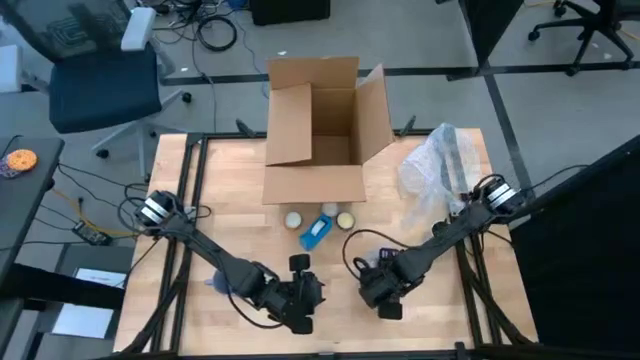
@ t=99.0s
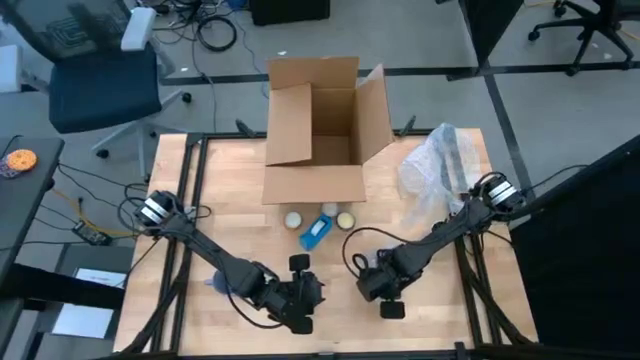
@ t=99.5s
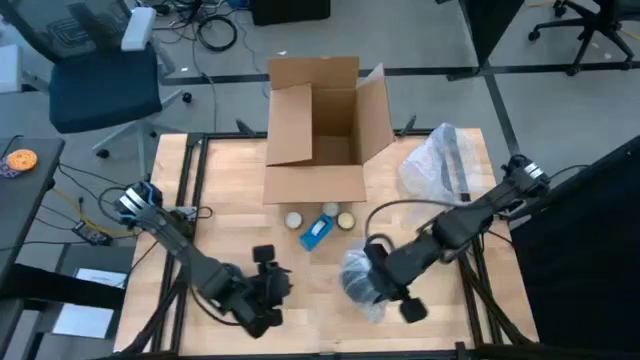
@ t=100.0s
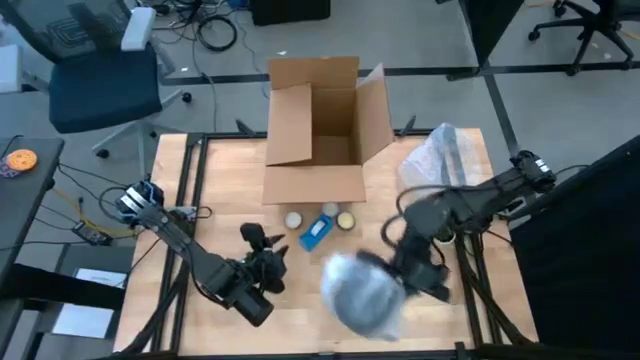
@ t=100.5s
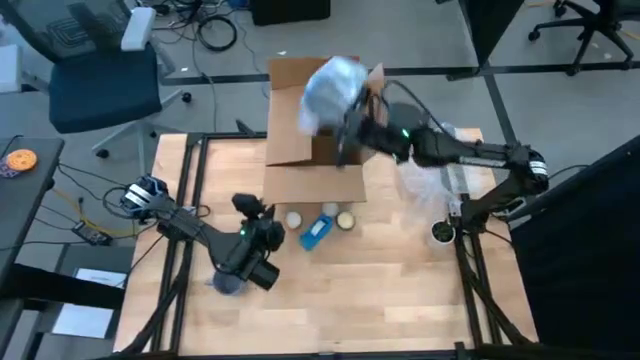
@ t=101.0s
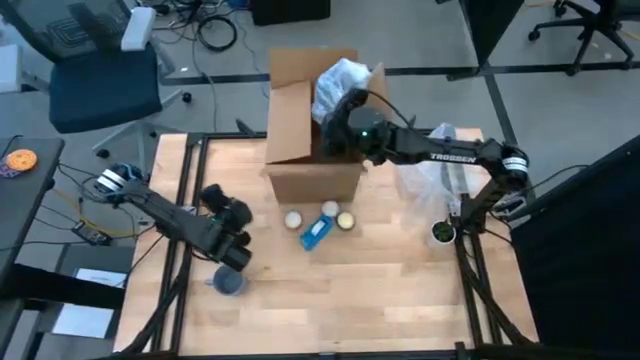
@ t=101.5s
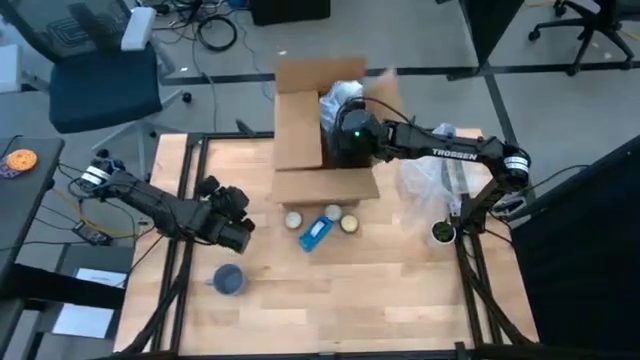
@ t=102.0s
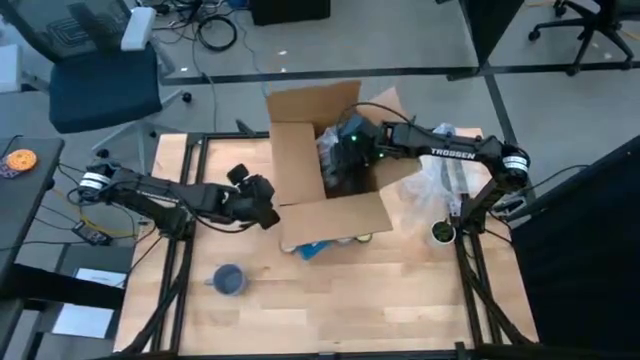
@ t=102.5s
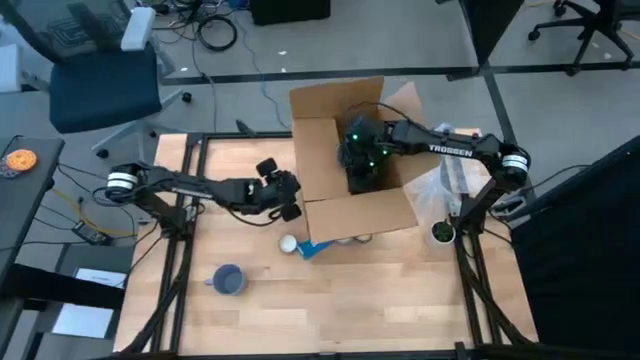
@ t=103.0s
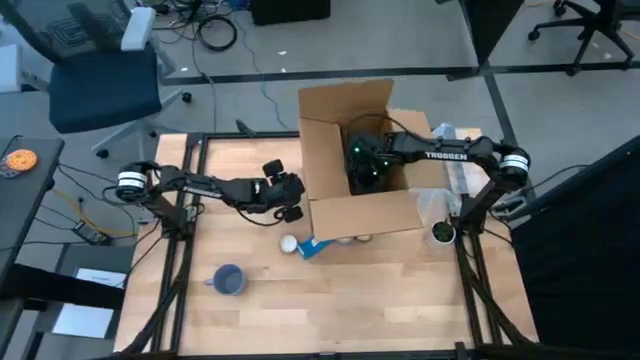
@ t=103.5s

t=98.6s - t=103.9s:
Task: wrap mug
Put the wrapped black mug into the box

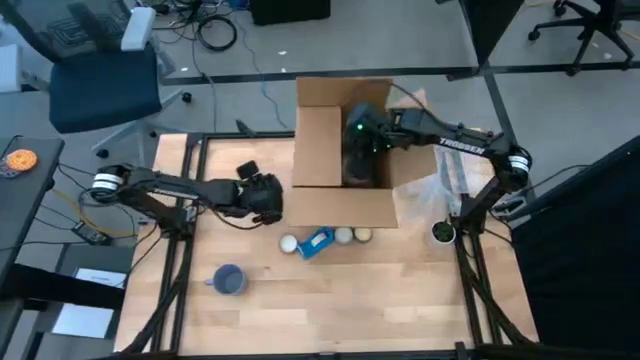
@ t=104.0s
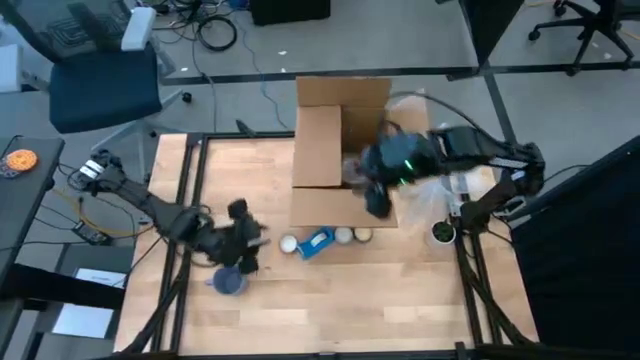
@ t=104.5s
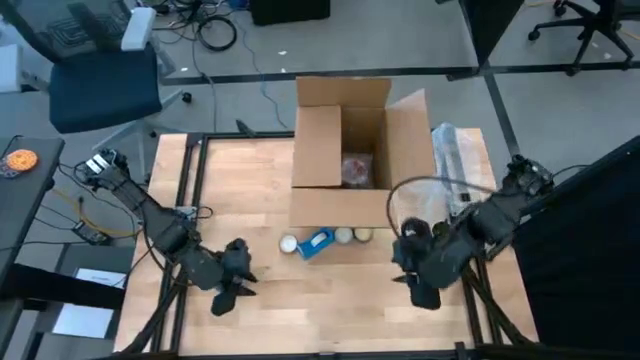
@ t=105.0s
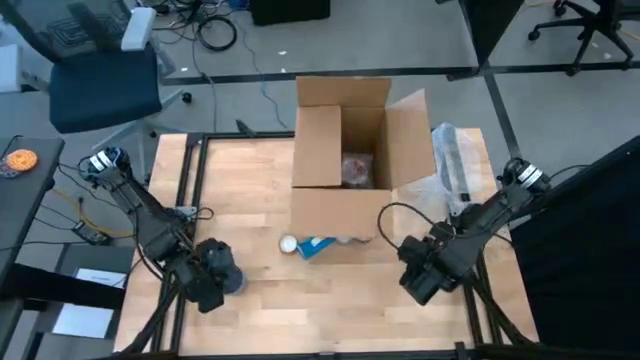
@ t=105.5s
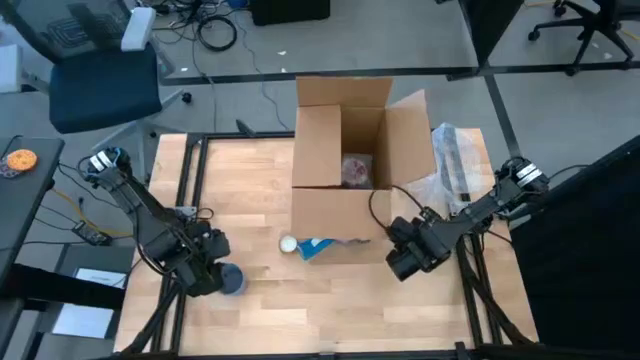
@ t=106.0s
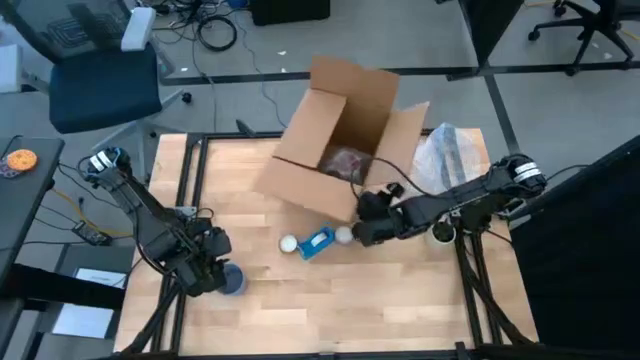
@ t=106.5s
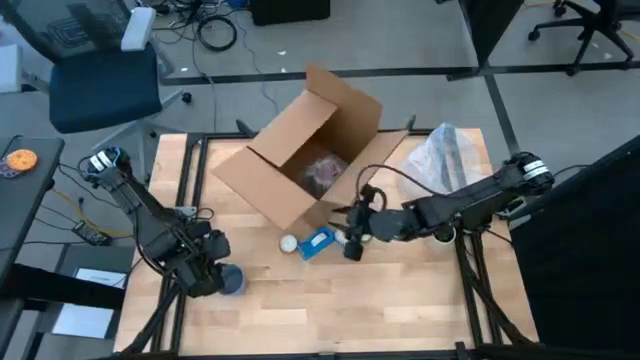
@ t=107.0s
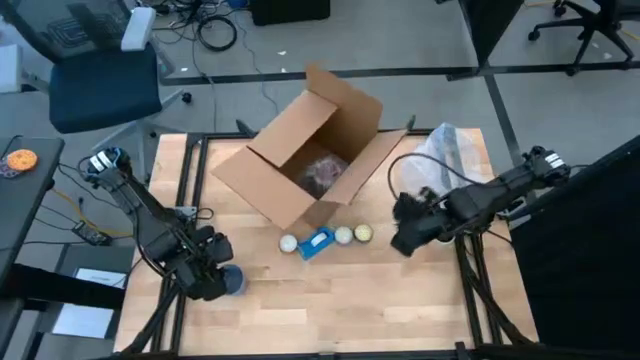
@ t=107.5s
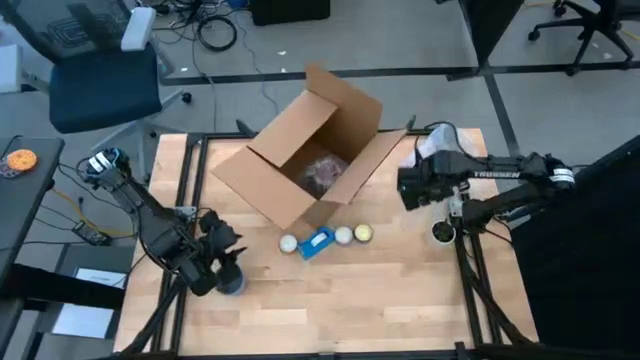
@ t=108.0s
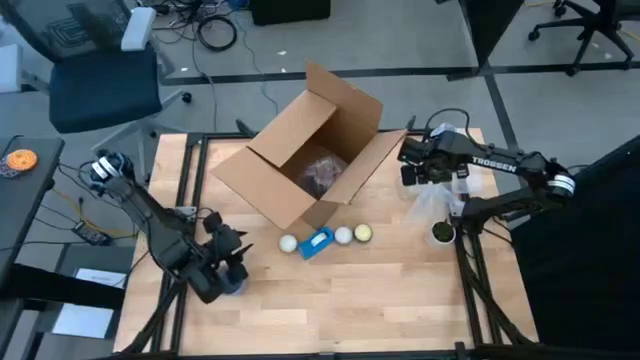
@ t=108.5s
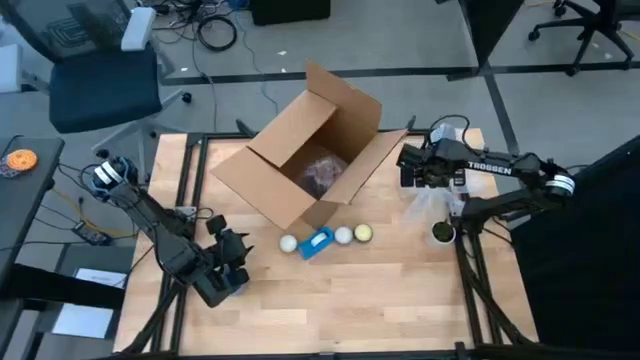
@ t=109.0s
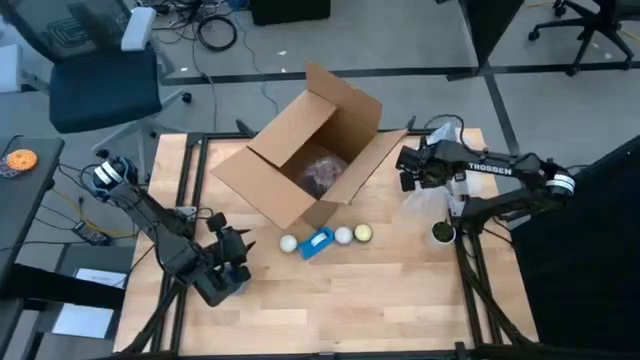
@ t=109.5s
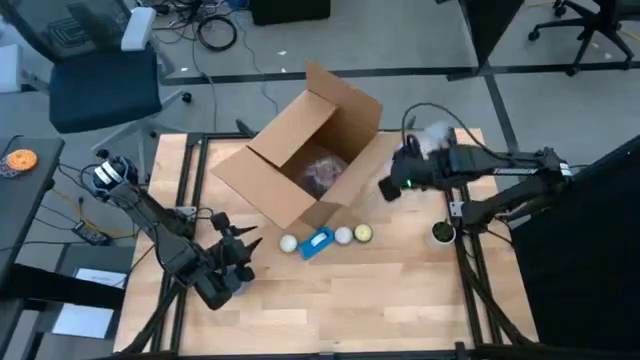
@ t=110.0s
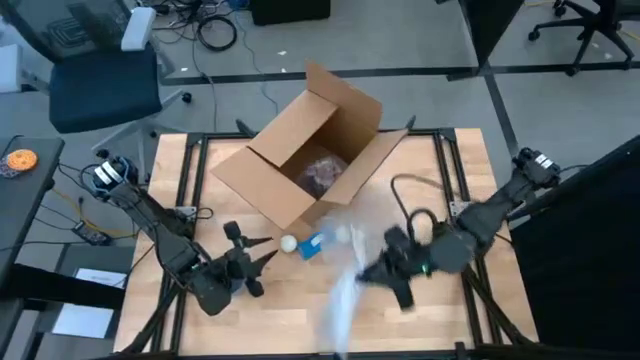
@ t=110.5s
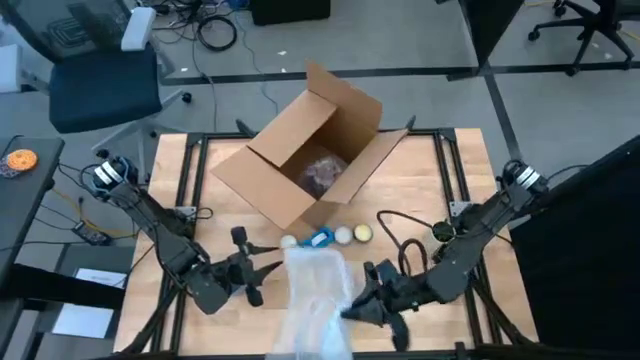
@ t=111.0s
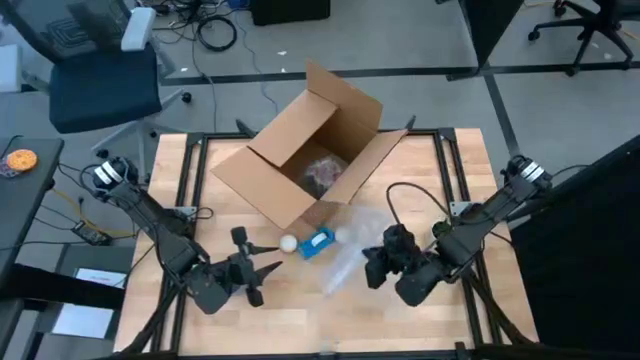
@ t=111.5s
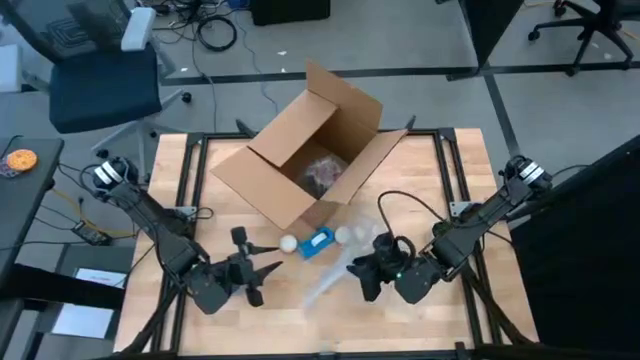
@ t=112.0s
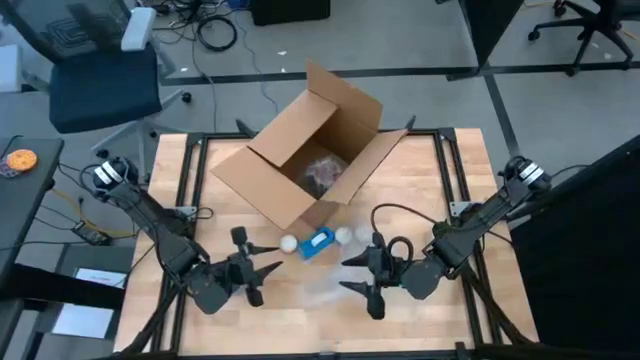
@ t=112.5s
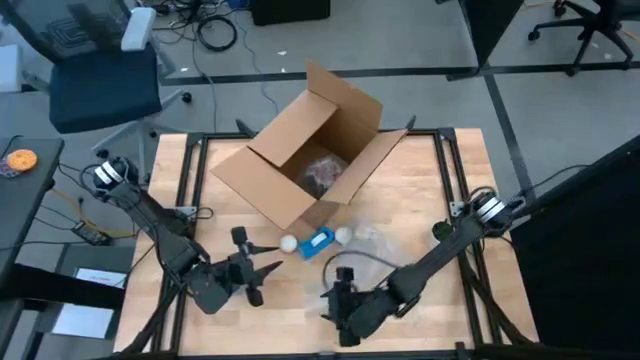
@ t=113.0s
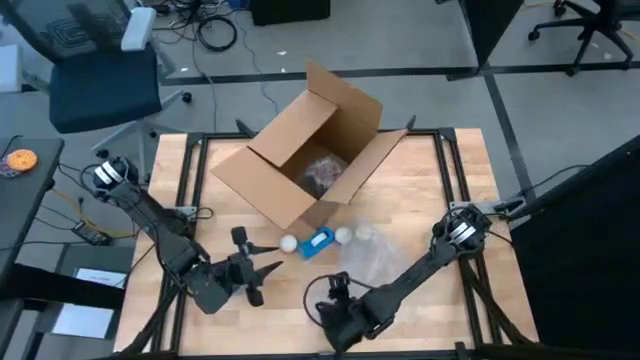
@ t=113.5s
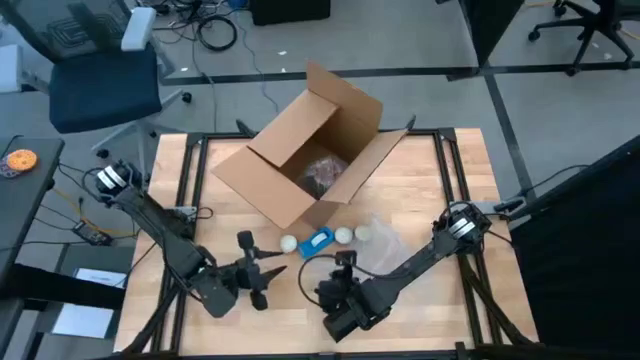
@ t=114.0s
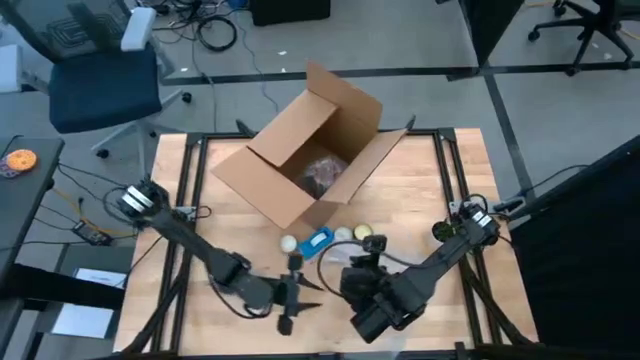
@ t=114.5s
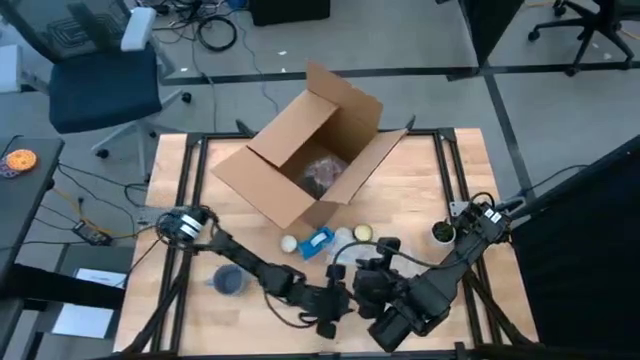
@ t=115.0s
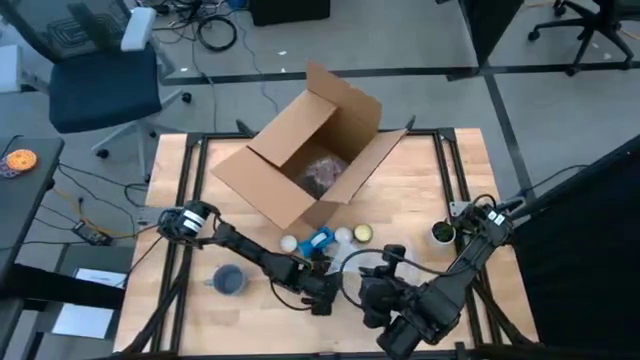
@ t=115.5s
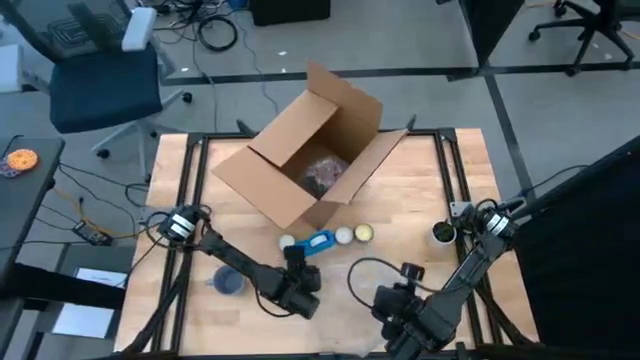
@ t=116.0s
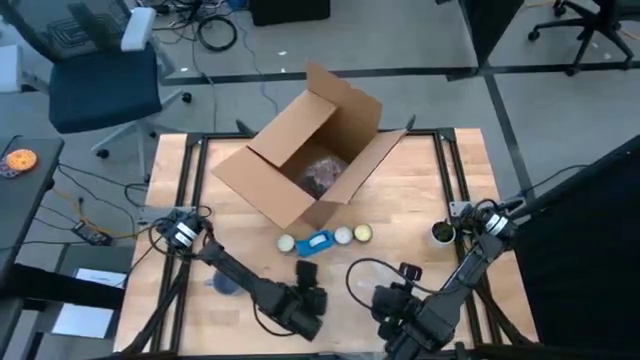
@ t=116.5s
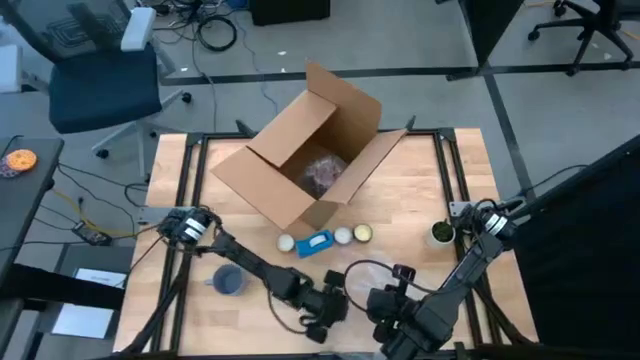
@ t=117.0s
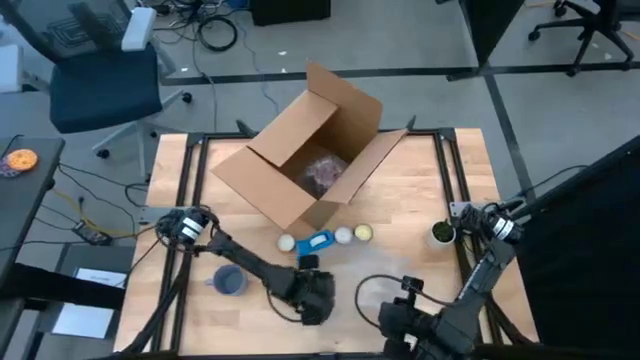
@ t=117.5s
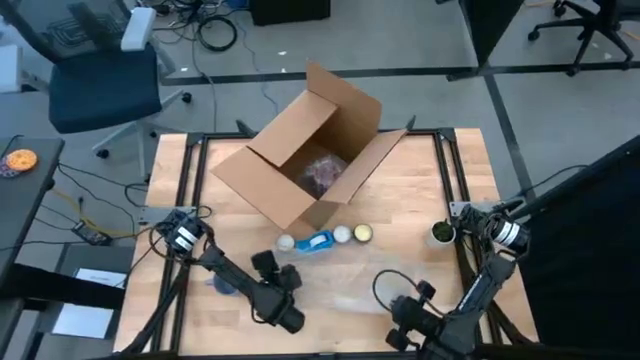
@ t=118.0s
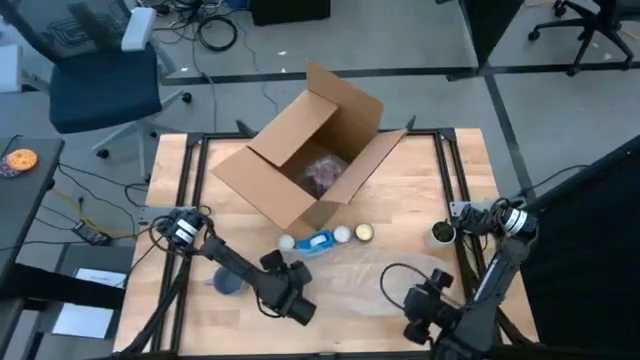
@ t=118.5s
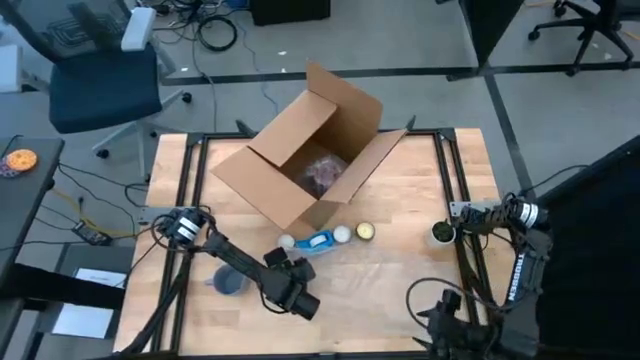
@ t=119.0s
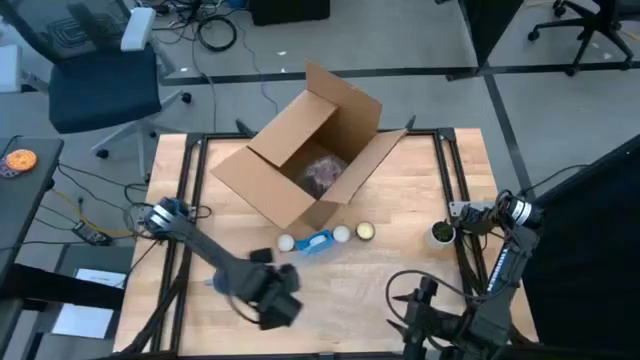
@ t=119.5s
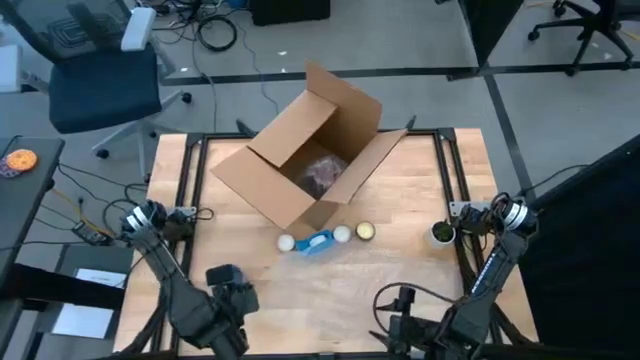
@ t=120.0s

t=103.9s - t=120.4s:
Wrap the purple mug with the bubble wrap
